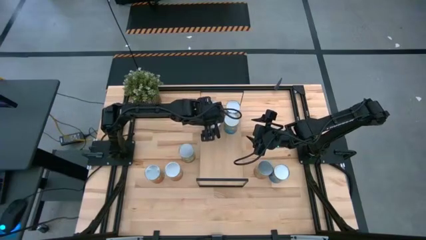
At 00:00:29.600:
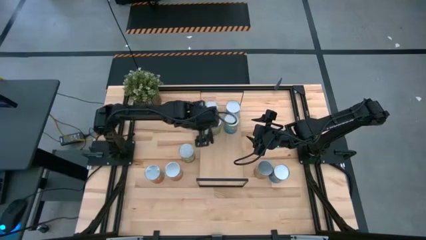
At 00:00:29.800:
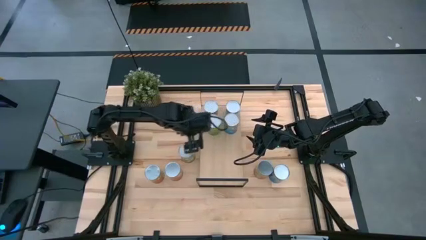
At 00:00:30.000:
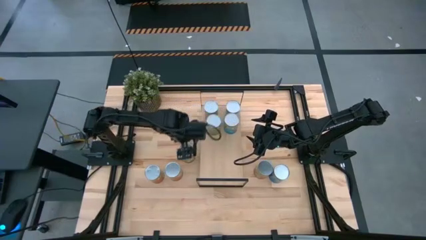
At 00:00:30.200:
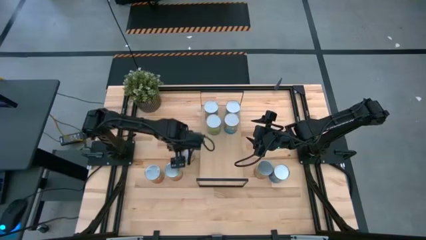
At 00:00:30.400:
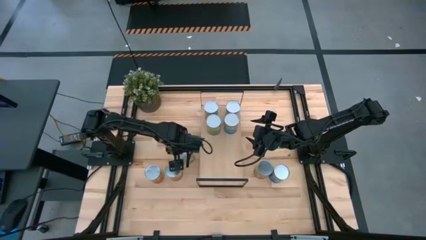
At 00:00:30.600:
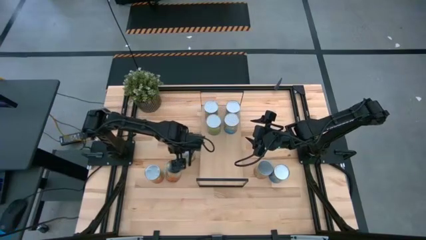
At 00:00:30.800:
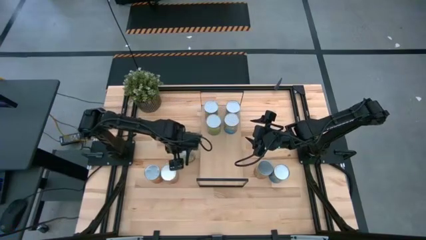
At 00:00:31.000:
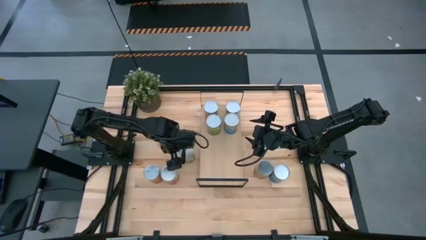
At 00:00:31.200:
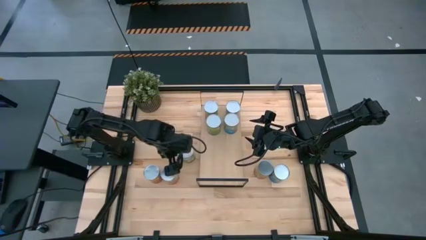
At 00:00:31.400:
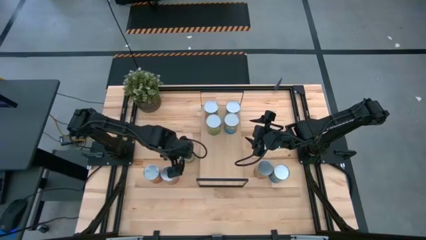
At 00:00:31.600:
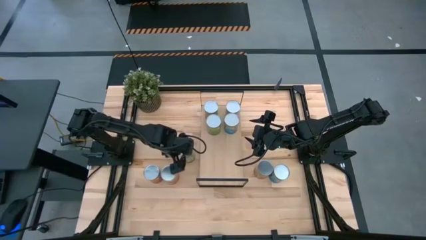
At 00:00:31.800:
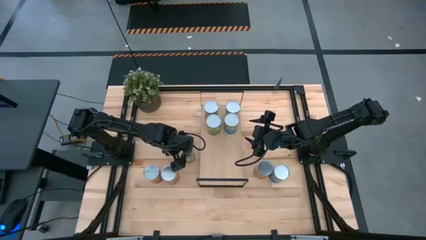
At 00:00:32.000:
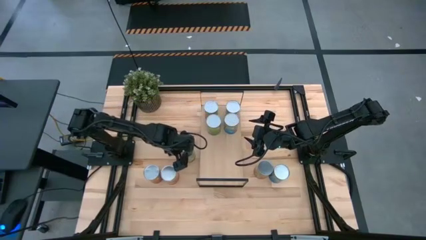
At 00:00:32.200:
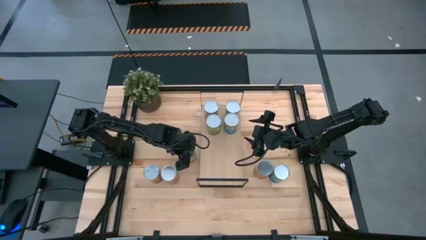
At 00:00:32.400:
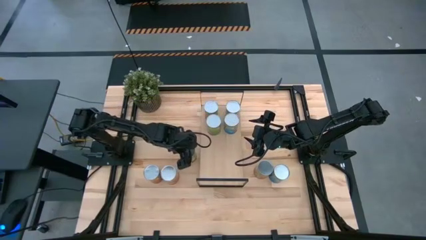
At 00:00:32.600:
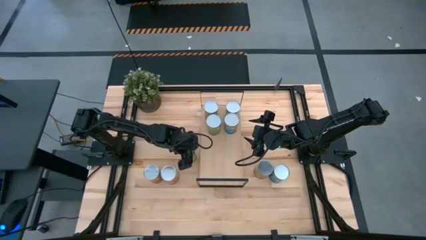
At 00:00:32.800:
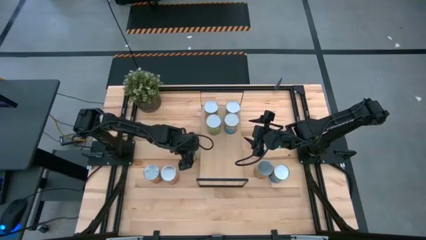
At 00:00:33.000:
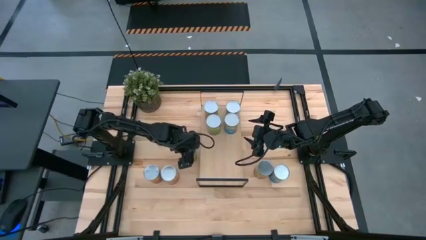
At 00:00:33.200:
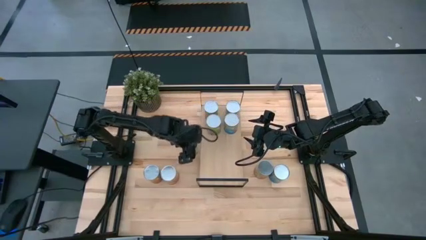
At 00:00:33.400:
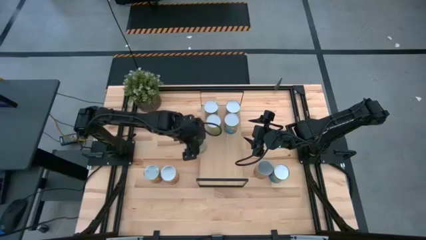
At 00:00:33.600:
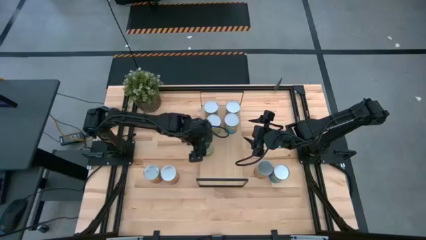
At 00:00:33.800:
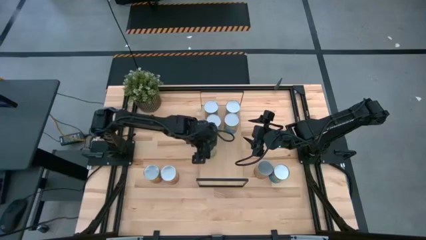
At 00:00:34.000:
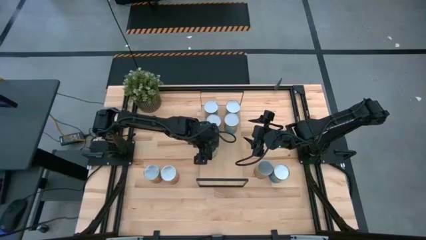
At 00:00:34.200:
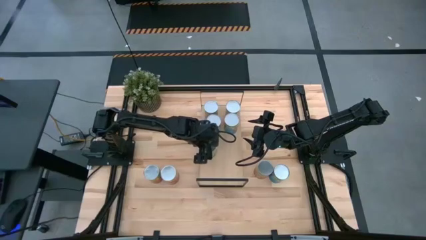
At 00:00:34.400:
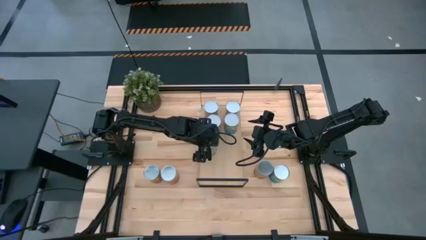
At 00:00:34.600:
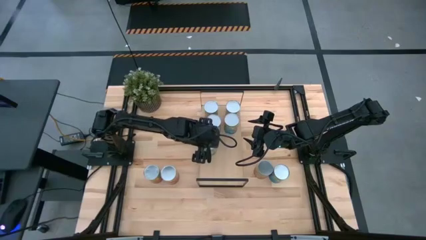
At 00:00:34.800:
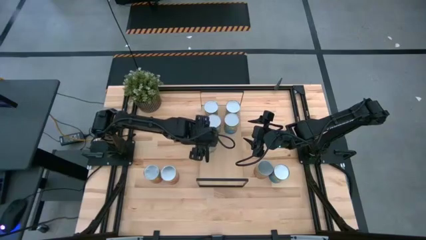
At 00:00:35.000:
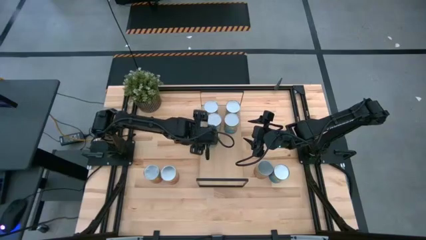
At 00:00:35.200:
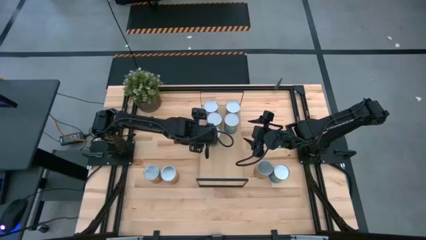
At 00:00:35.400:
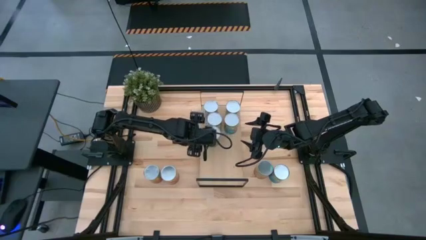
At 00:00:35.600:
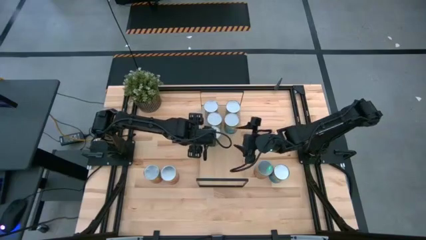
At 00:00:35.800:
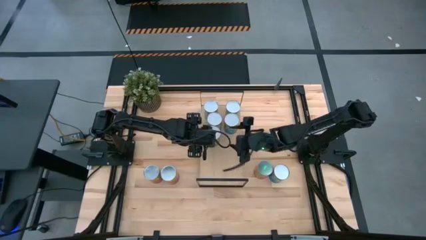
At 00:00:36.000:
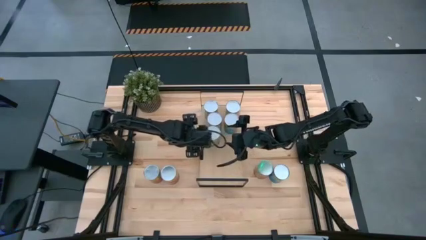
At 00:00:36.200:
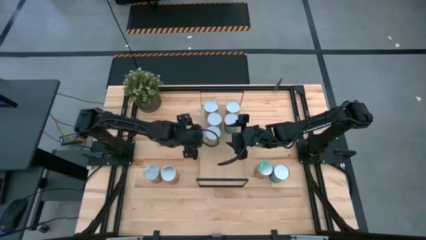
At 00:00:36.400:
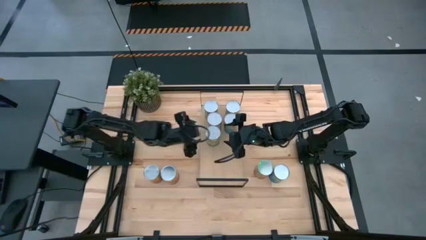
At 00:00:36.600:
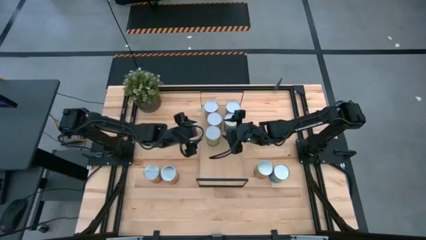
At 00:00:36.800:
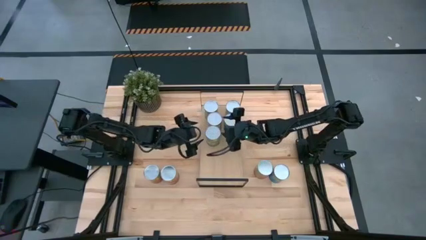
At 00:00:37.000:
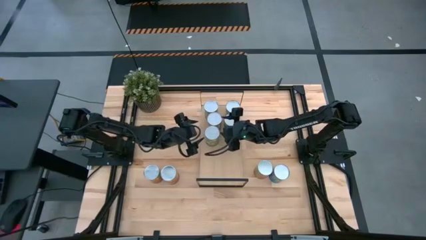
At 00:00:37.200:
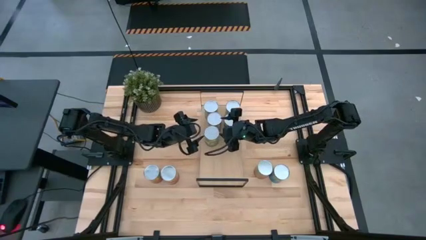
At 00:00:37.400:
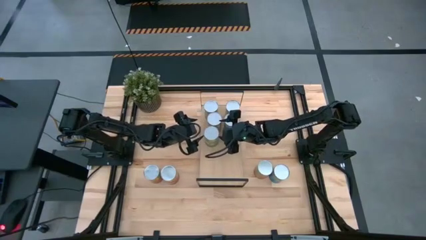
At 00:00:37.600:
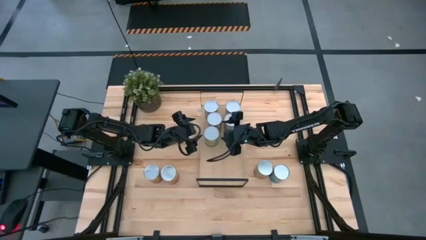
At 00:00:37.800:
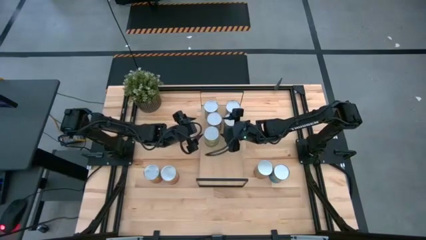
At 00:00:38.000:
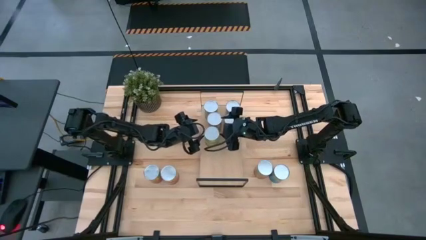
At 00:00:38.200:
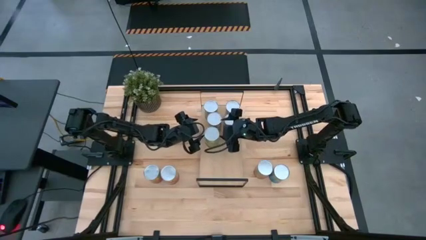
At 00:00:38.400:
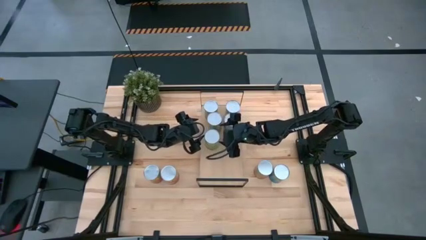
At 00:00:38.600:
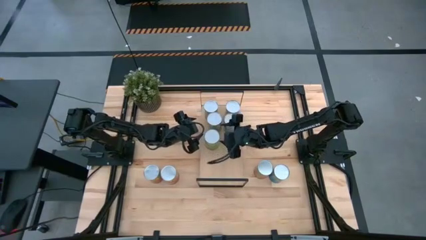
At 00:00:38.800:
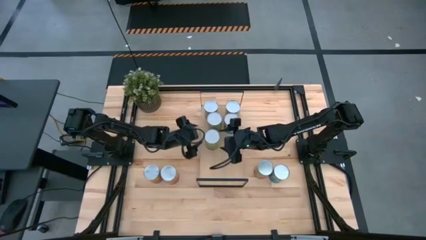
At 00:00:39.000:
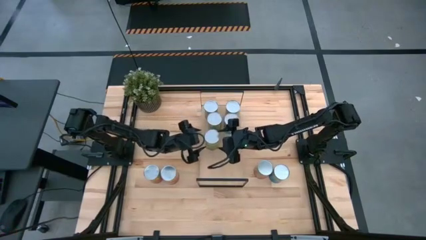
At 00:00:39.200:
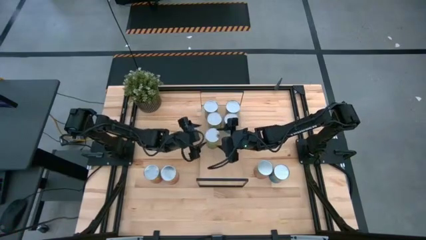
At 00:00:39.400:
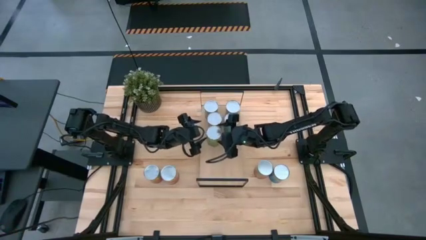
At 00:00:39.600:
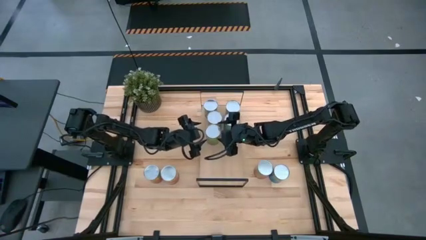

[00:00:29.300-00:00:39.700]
Task: Pick and place cans onto a shelf
Put the canned pears on the shelf

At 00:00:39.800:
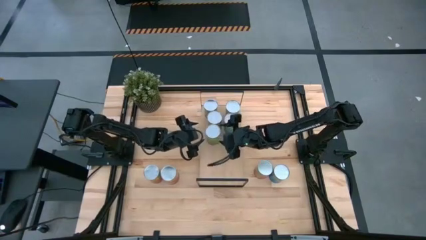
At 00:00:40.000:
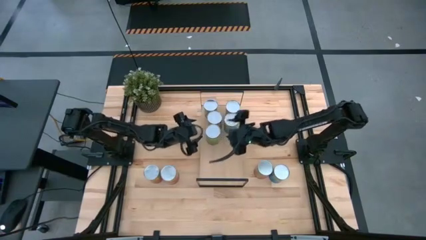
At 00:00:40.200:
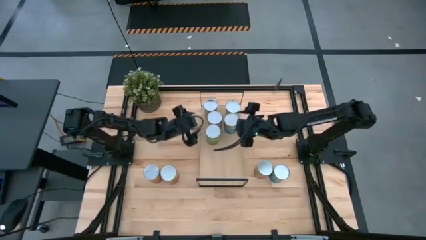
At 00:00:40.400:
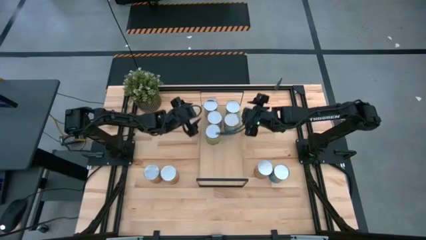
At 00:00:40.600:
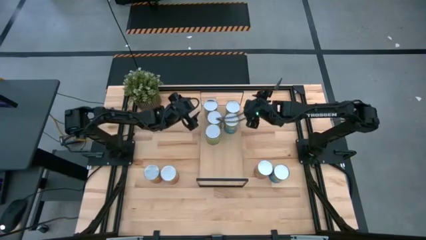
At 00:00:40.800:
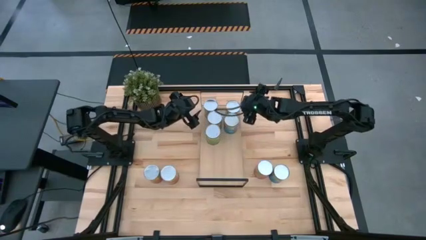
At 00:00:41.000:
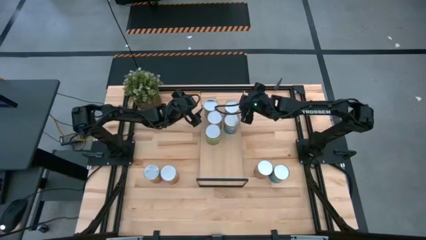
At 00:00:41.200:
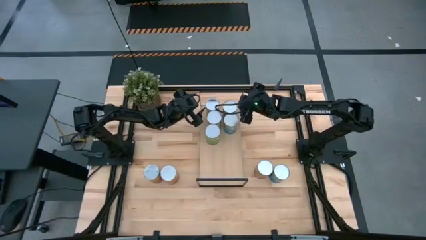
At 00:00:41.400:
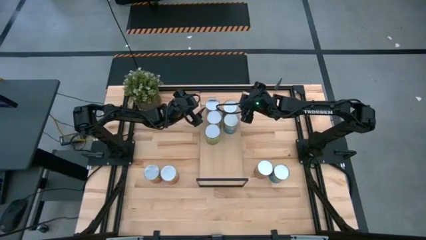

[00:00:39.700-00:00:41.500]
Adjust the cans on the shelf

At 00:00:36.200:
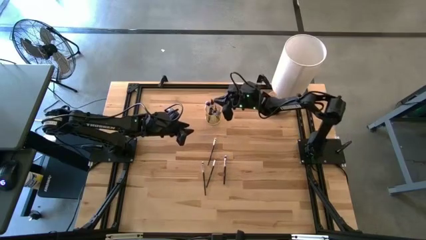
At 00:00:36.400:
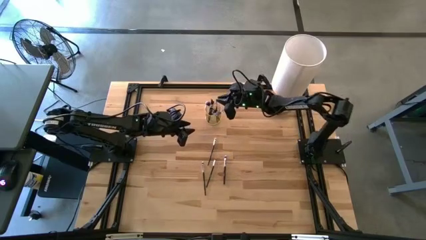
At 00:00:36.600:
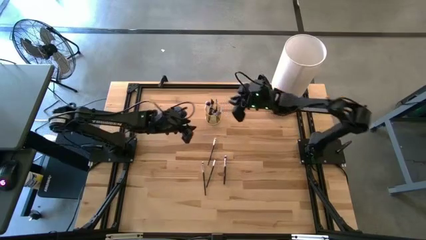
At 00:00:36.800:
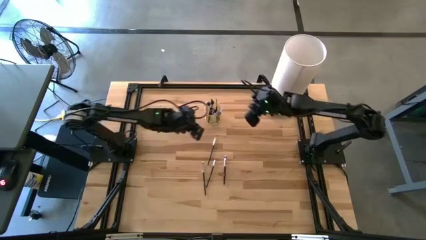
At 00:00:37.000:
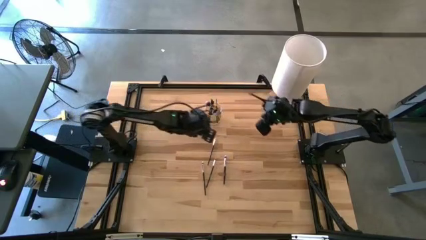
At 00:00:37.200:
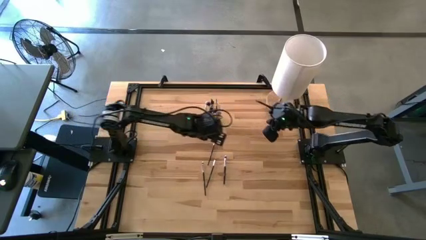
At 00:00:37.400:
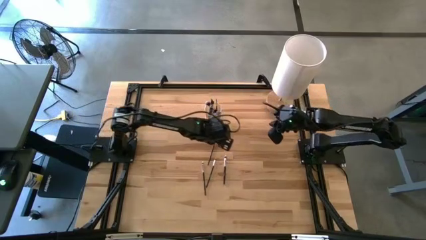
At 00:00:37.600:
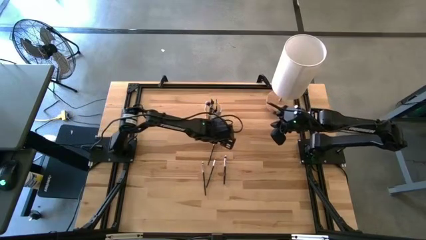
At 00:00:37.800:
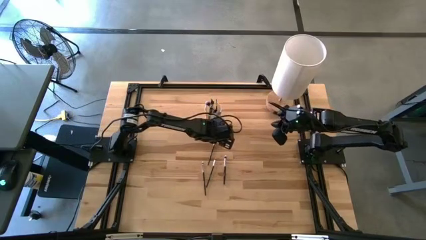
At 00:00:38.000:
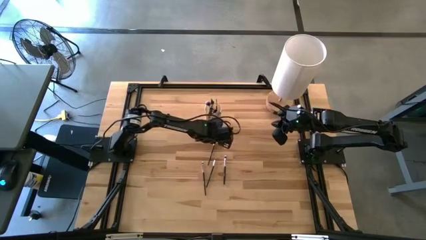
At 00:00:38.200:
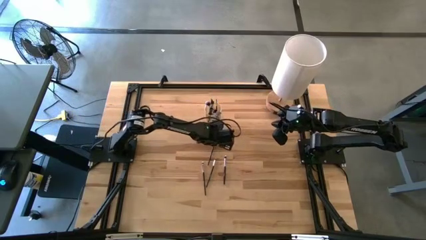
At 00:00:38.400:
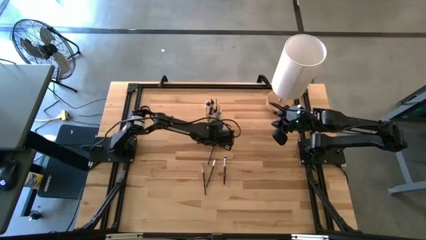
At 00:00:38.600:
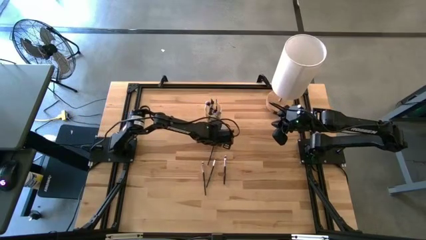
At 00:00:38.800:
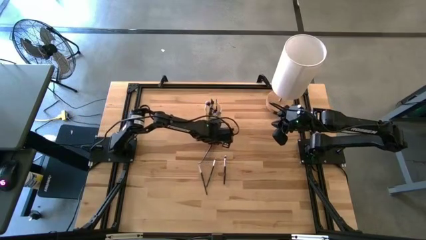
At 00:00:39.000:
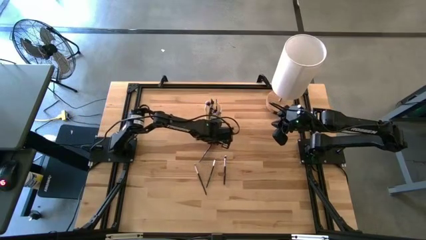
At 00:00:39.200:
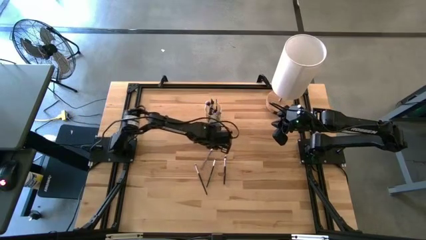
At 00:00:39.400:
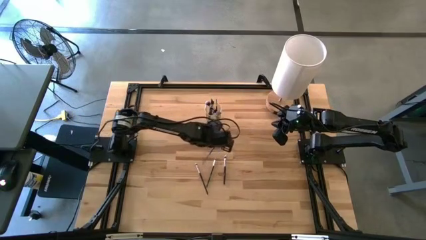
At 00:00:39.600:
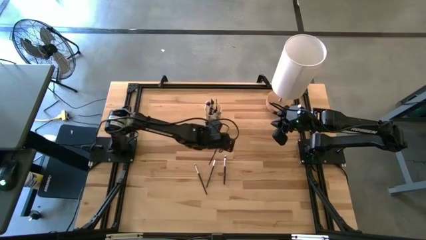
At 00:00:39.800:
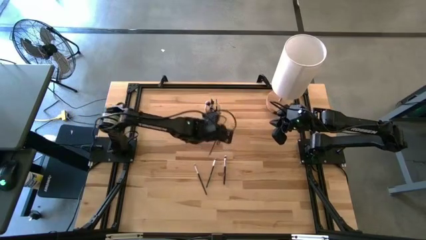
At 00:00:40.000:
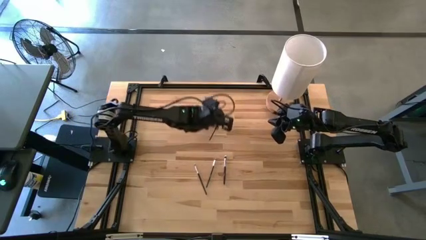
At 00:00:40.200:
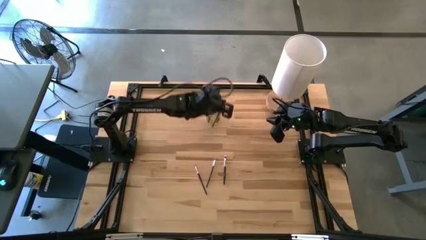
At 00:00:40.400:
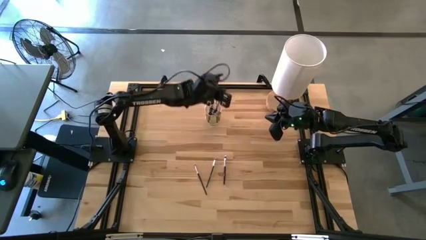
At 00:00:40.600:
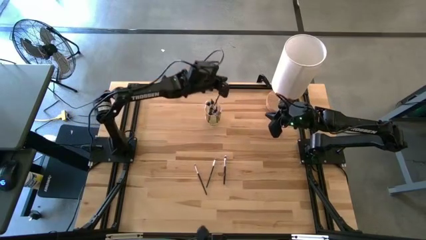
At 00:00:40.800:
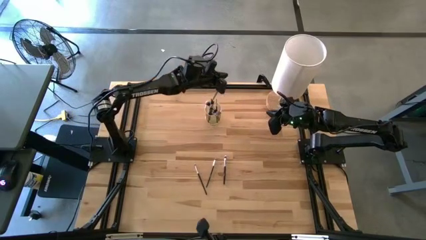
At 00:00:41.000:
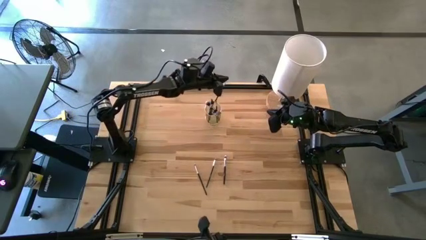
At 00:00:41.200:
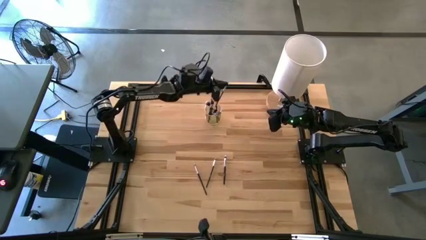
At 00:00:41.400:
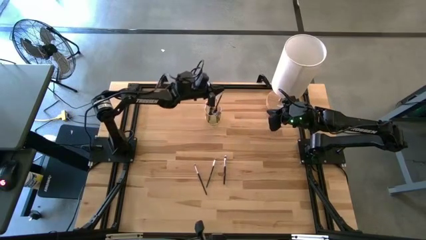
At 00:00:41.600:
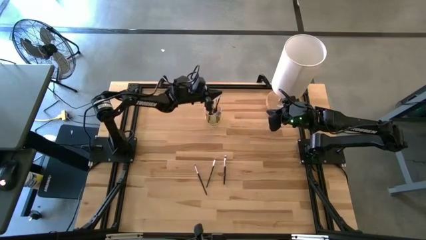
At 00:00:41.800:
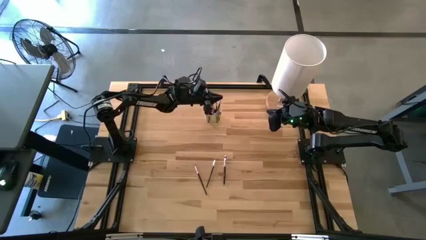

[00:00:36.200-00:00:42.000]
Task: Put items in baskets/containers
Put the eyeshadow brush into the pen holder
